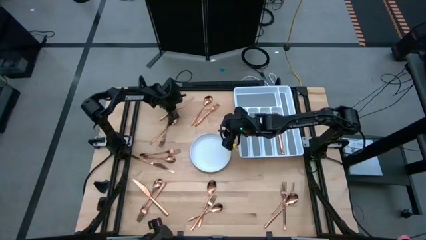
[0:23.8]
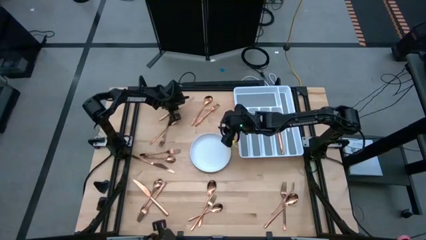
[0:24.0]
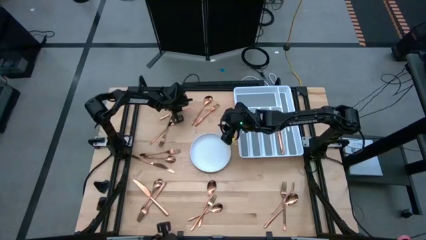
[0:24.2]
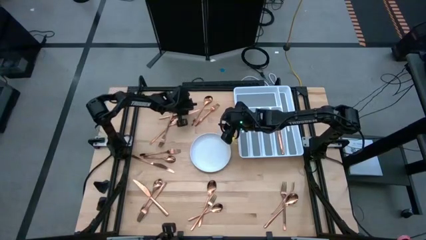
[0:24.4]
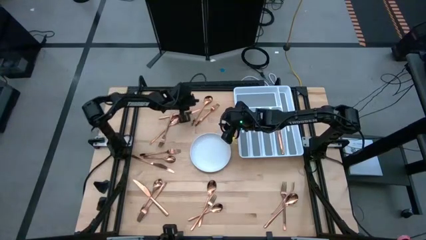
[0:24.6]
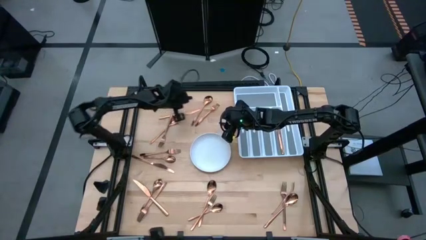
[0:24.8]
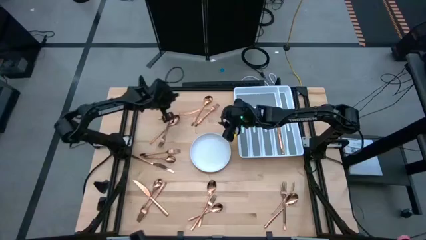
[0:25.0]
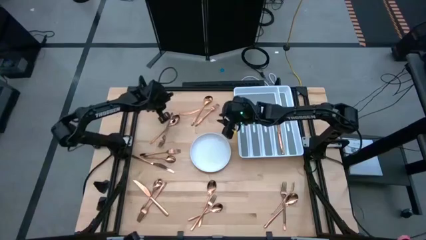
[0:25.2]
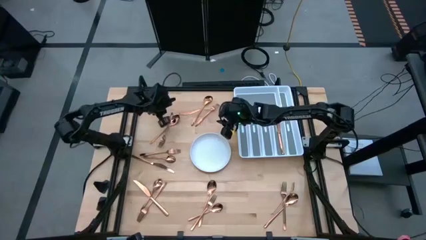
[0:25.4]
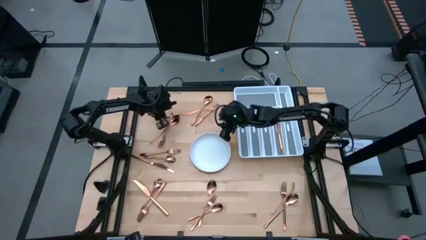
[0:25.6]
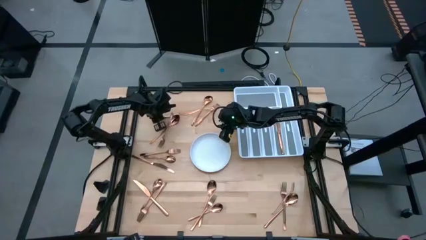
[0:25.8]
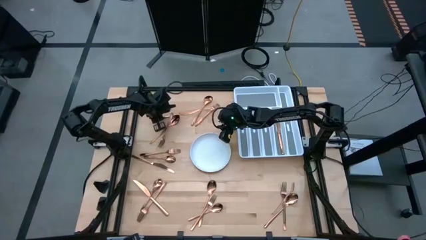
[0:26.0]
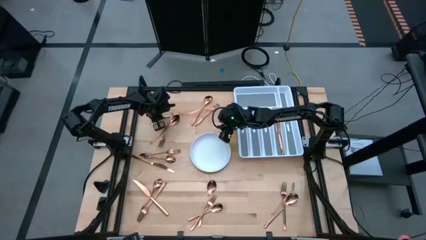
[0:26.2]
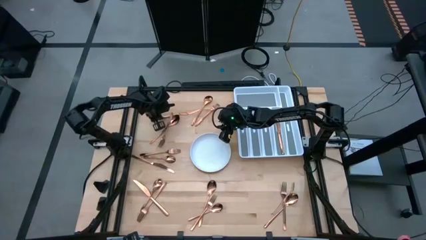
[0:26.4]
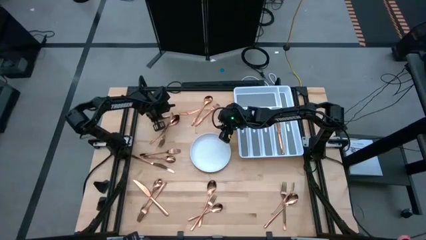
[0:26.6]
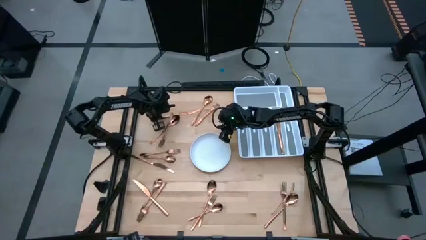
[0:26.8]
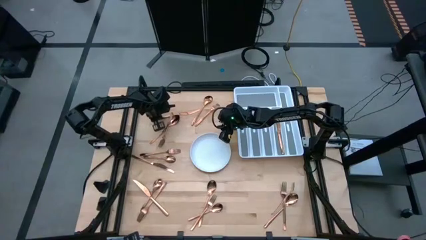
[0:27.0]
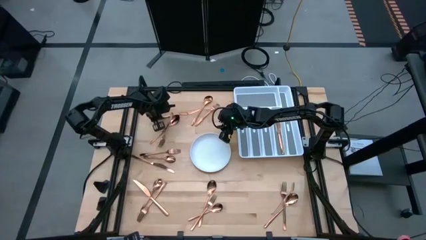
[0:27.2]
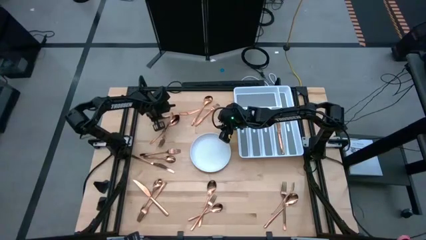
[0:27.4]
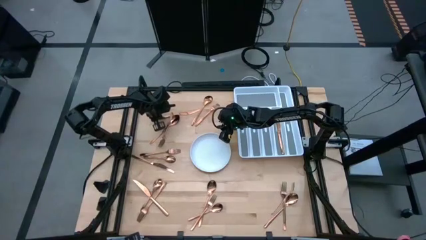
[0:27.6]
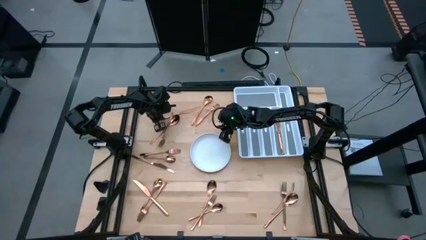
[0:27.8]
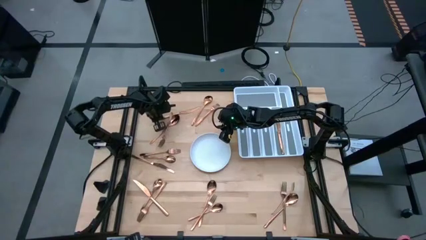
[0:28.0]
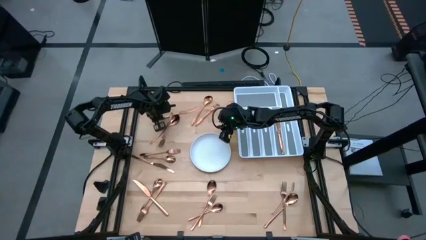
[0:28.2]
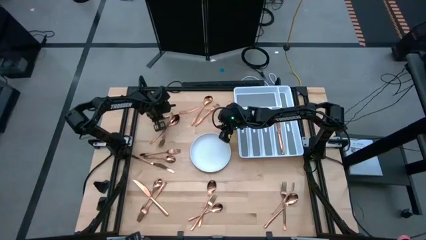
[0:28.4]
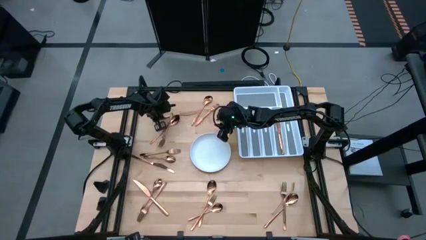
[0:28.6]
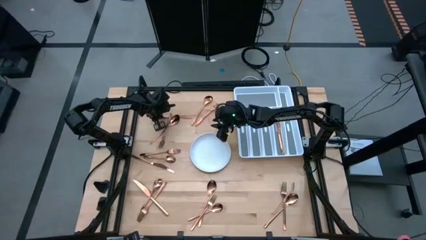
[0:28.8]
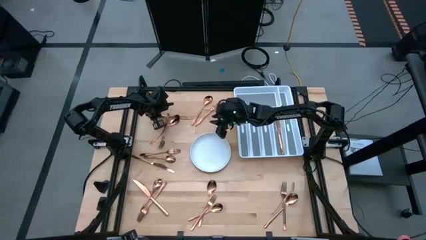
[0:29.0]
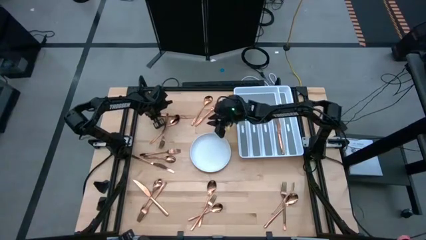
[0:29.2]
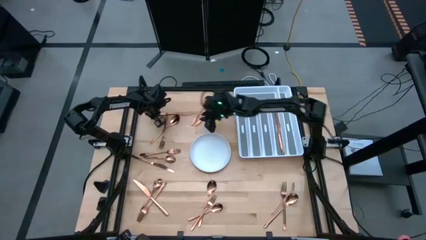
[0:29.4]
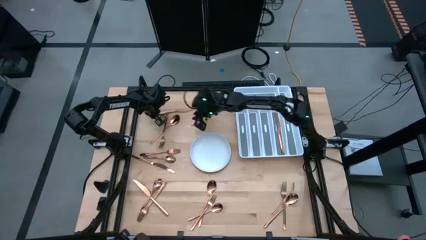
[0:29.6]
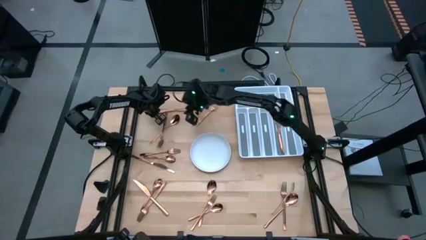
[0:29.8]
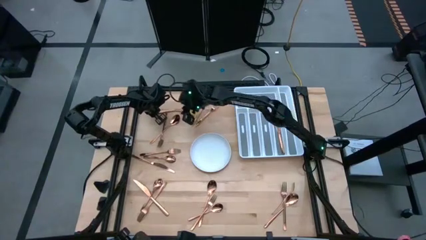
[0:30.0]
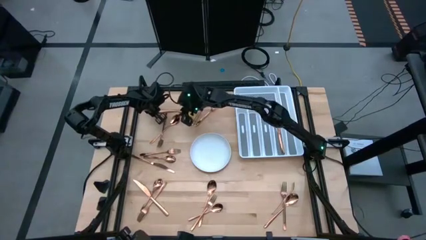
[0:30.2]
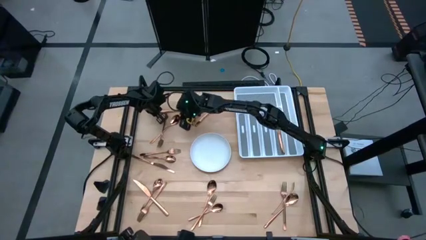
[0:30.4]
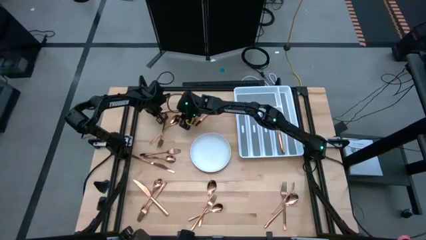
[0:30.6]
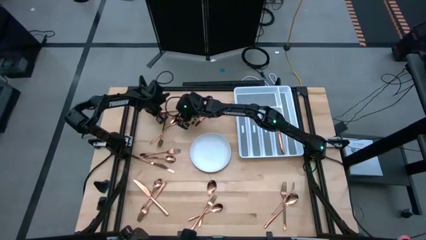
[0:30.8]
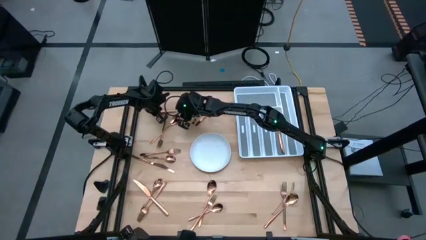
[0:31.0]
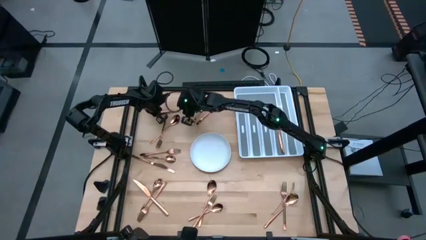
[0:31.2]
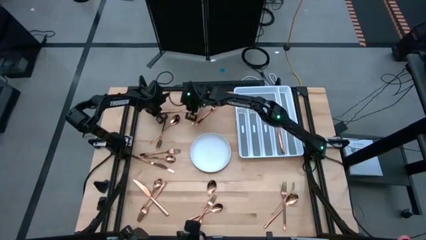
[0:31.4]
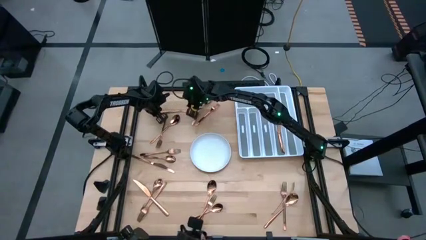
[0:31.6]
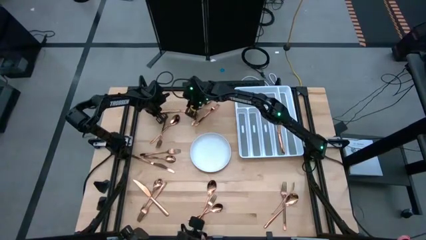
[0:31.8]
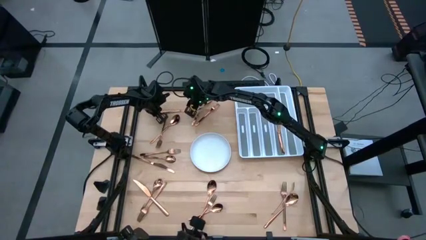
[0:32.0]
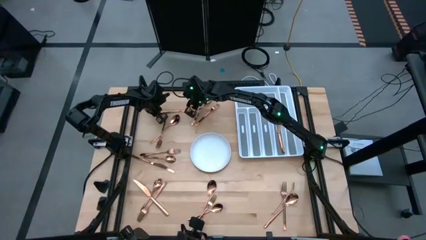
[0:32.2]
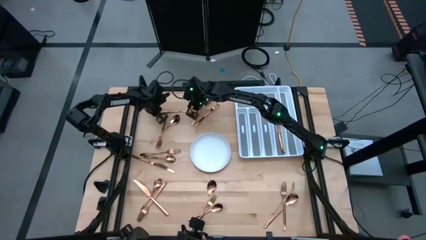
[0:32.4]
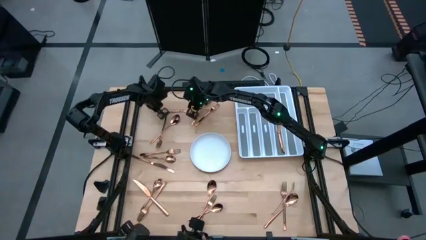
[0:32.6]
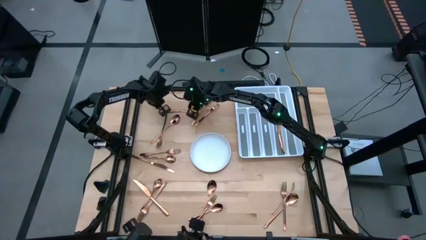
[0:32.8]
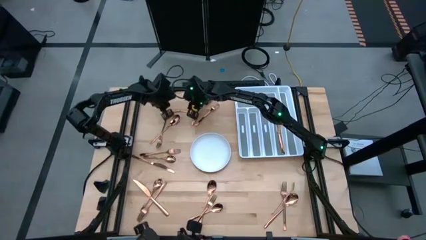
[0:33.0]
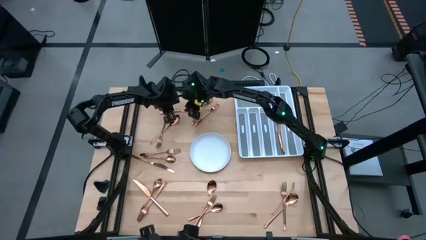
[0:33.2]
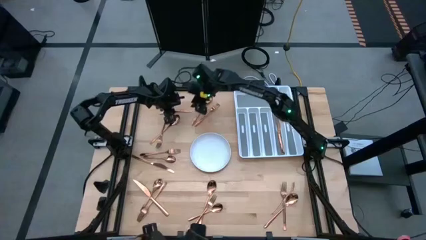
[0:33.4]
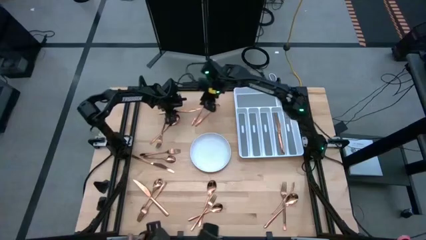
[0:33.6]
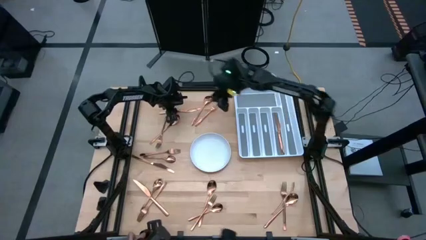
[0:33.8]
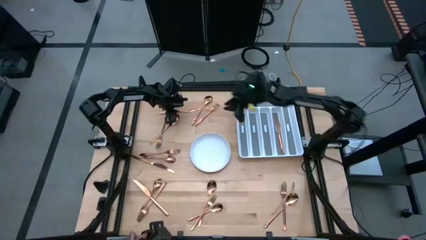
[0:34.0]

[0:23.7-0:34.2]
Task: Sort silverware
Put the knife in the silverware tray
